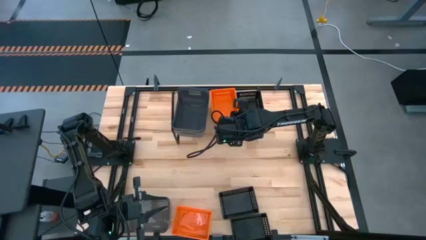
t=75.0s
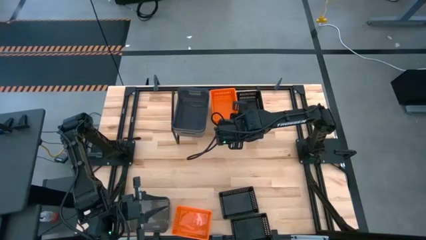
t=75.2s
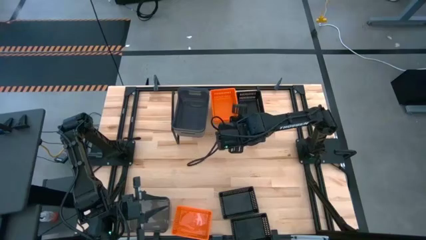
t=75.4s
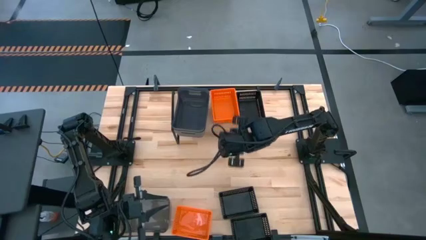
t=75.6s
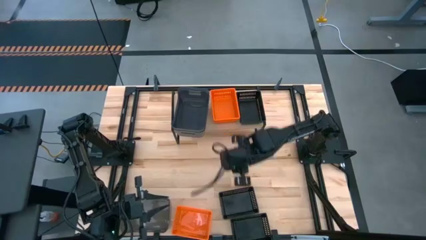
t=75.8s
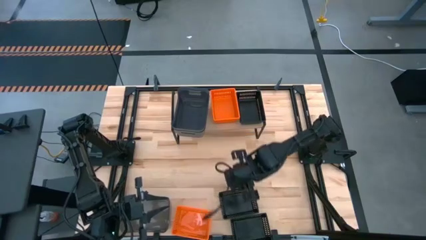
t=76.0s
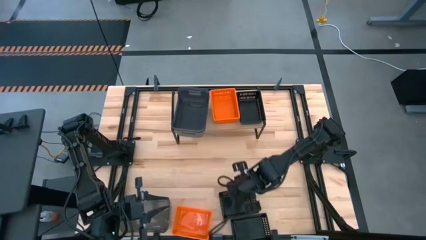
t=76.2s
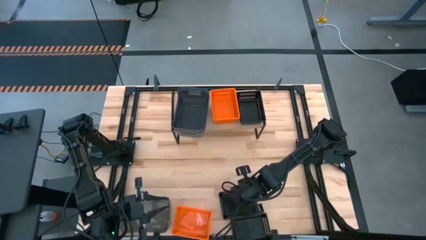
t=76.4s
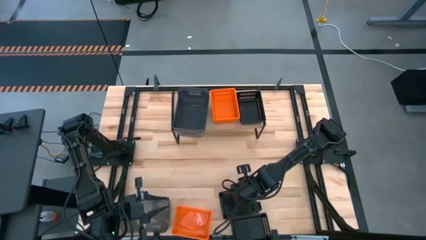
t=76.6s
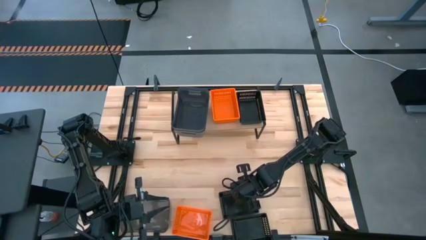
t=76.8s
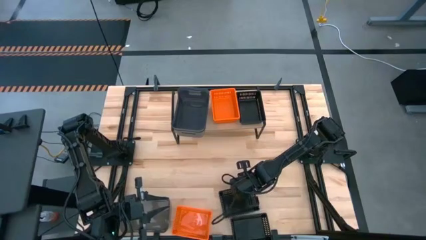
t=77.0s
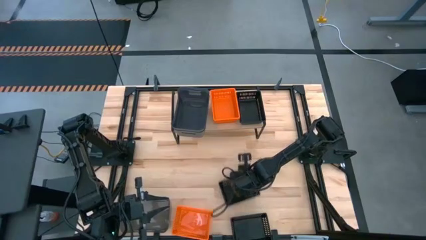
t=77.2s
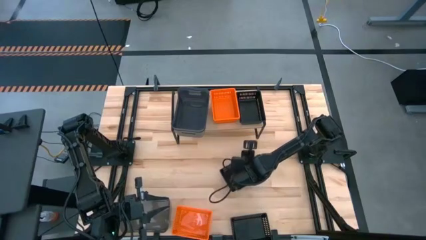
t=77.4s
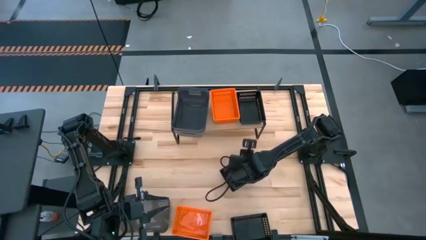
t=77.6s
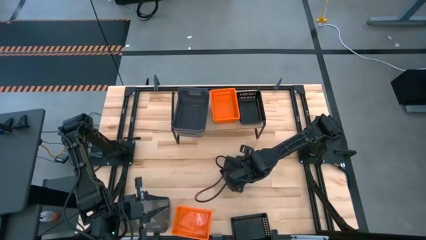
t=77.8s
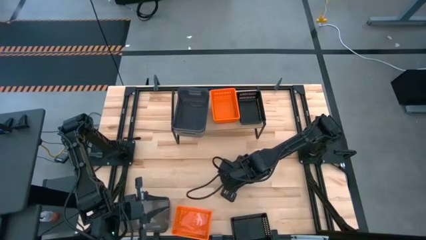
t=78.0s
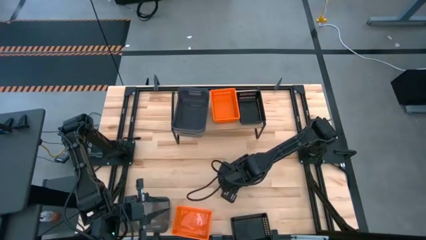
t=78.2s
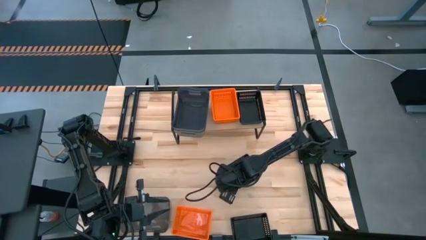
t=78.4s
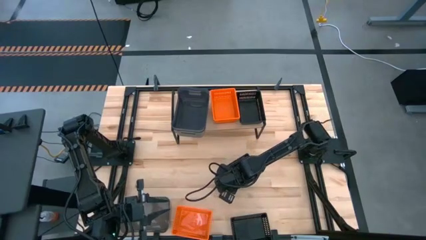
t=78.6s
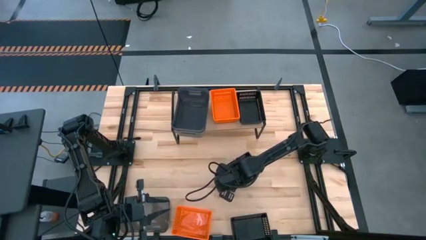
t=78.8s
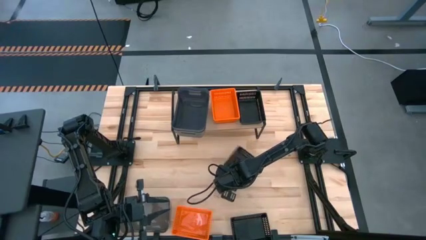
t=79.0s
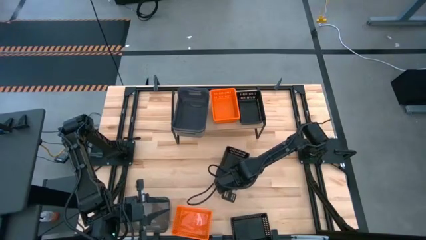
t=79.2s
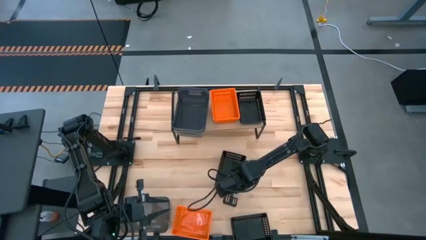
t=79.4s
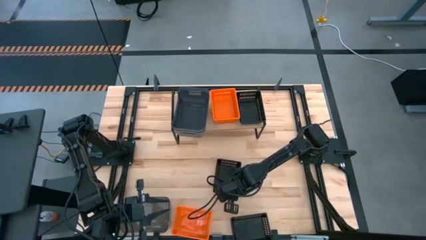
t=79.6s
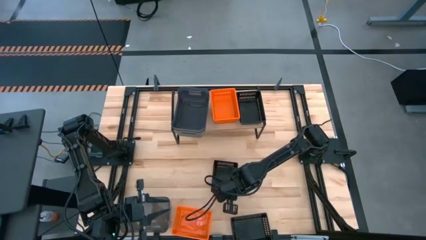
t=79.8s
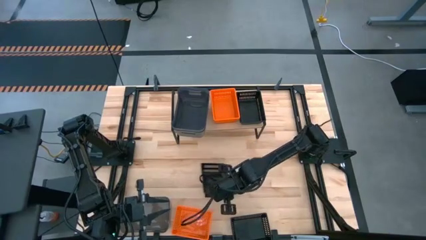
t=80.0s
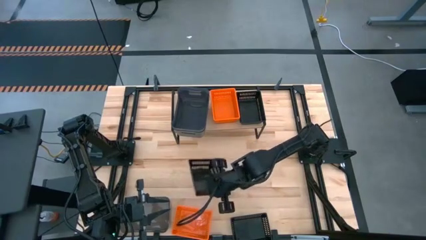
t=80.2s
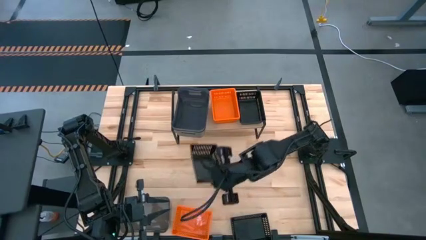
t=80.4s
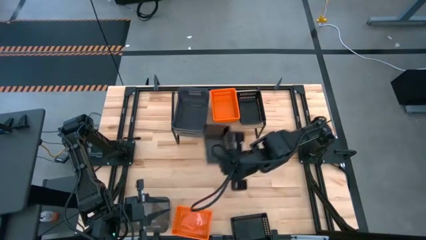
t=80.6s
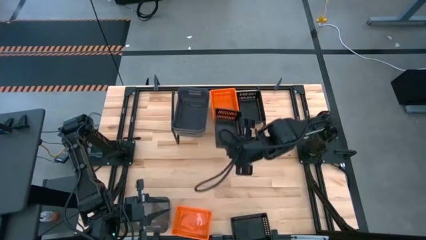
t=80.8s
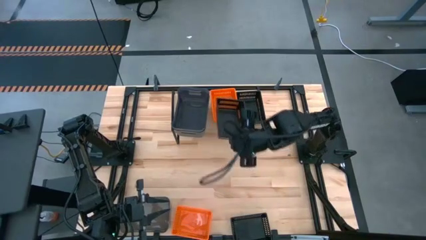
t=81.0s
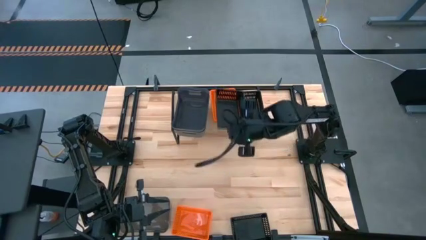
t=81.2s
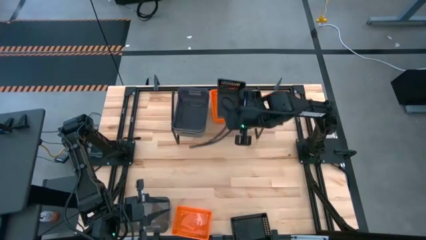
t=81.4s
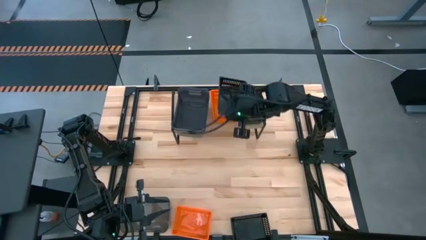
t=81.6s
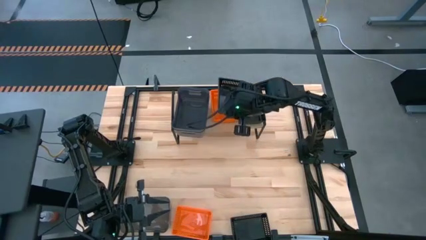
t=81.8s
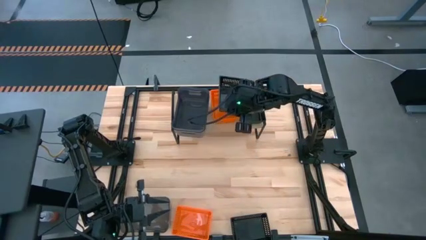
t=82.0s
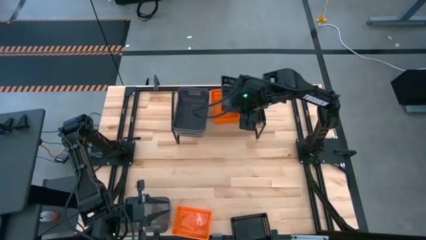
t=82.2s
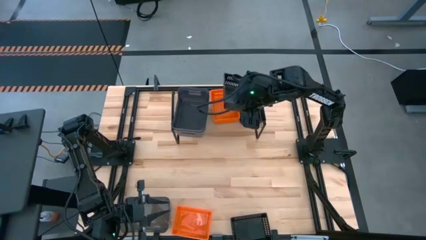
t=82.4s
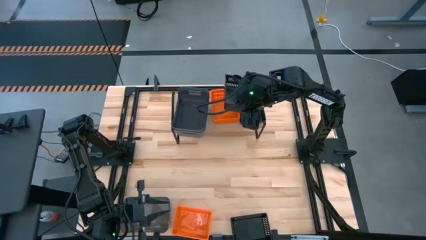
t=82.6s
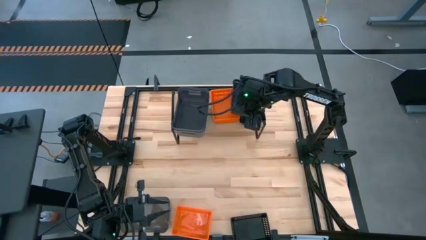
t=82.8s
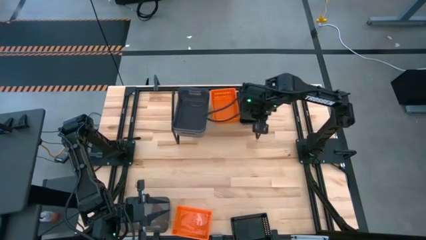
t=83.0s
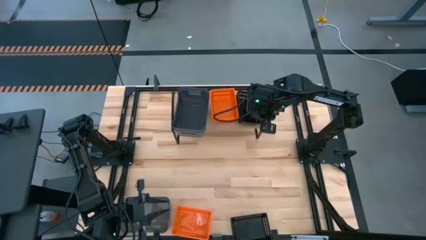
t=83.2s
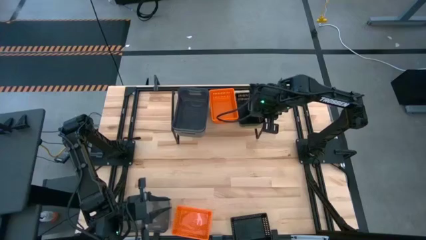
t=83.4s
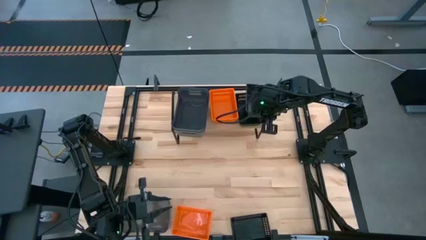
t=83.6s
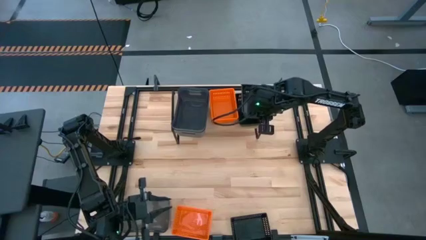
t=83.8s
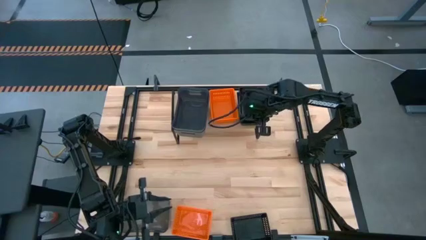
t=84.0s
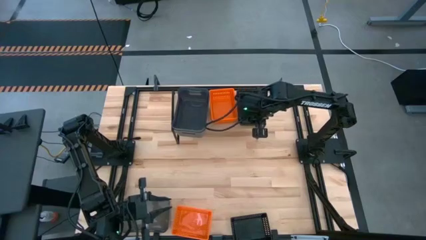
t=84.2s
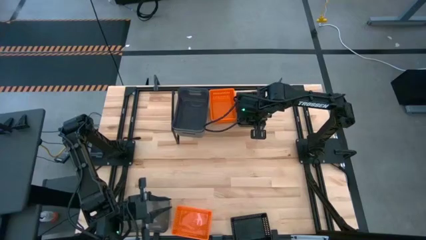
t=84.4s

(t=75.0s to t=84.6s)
Task: Stack baskets on shelf by color
Stack the top black bin on the black bin on the shelf

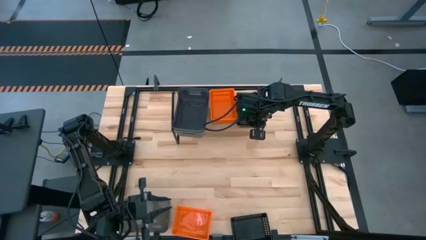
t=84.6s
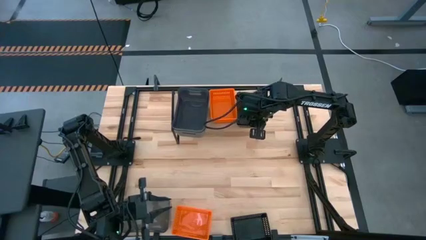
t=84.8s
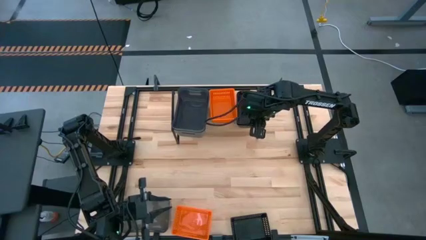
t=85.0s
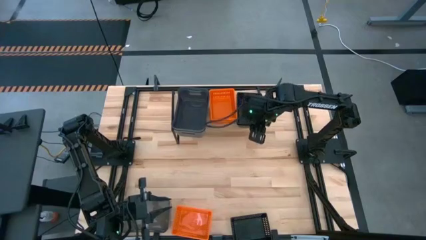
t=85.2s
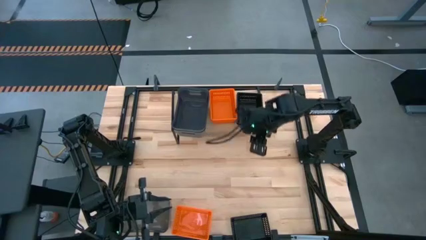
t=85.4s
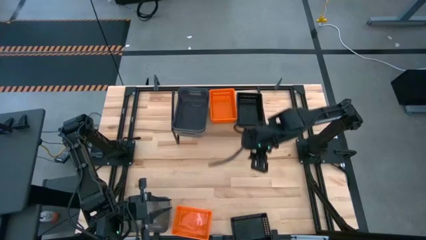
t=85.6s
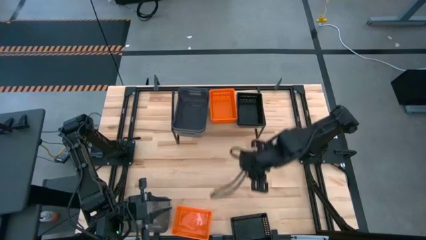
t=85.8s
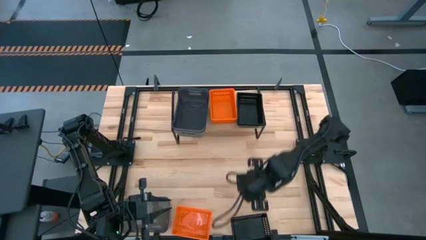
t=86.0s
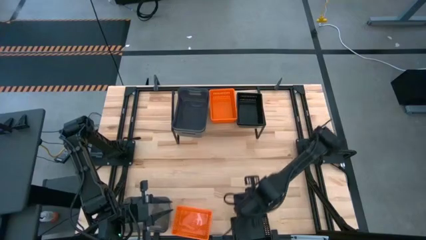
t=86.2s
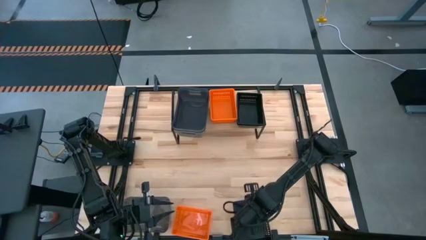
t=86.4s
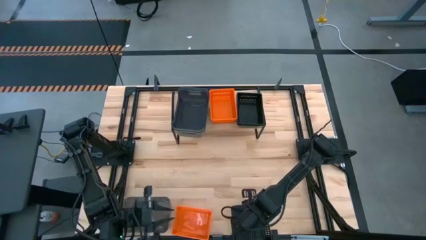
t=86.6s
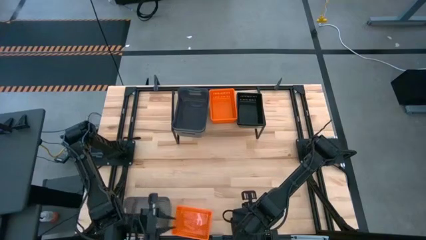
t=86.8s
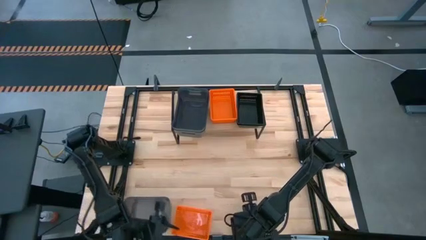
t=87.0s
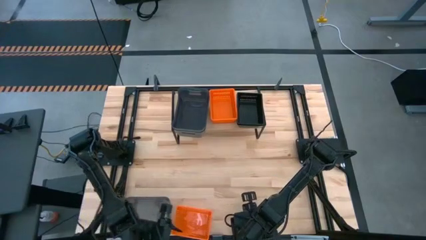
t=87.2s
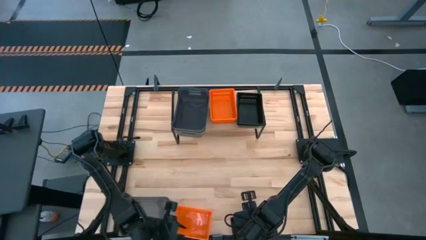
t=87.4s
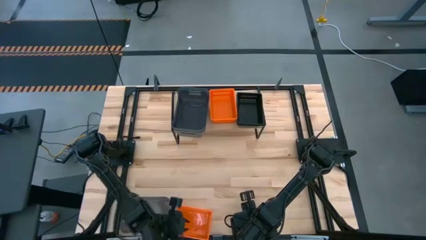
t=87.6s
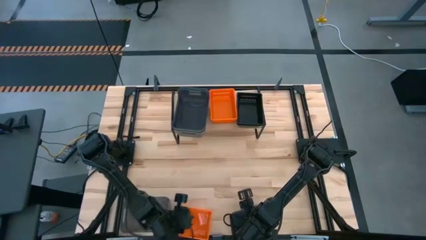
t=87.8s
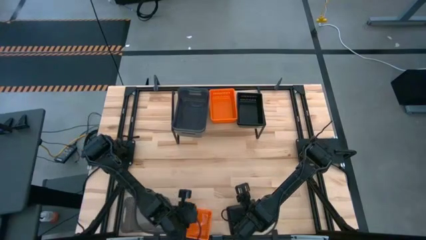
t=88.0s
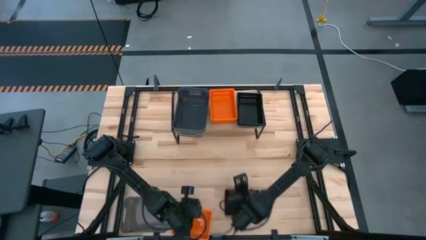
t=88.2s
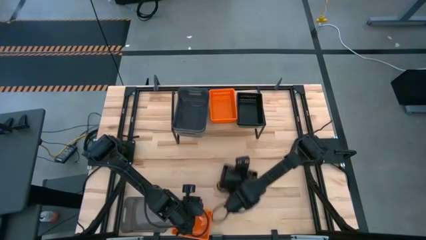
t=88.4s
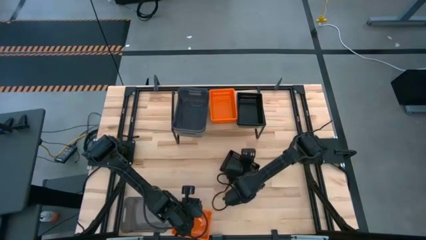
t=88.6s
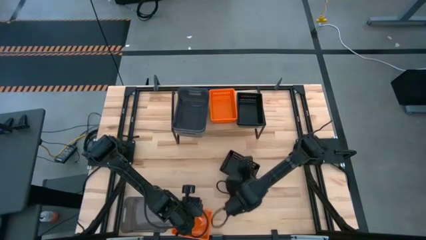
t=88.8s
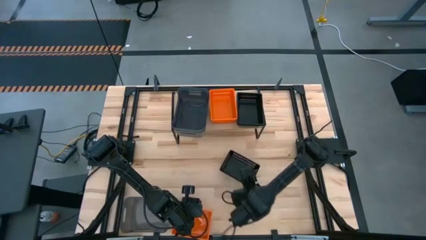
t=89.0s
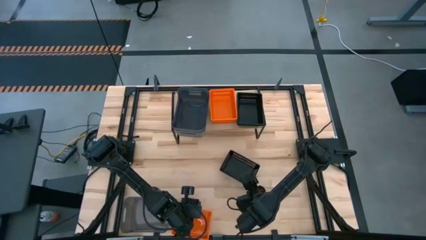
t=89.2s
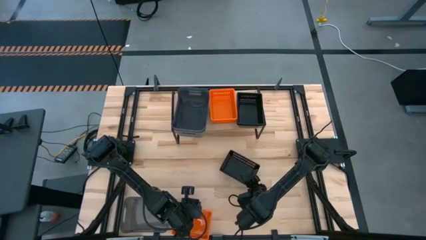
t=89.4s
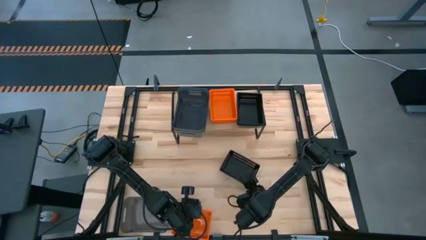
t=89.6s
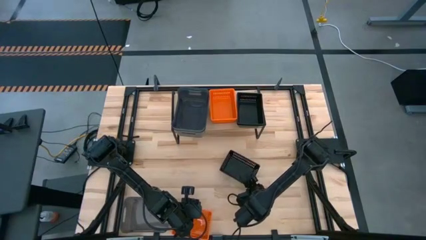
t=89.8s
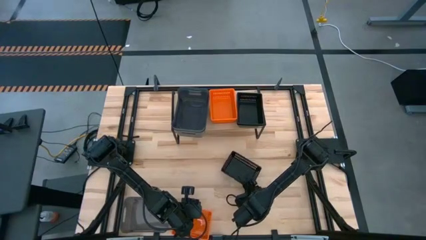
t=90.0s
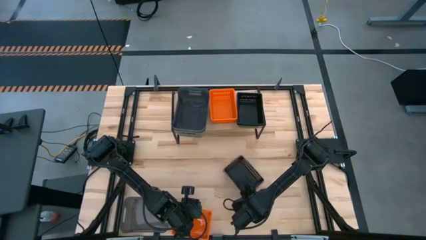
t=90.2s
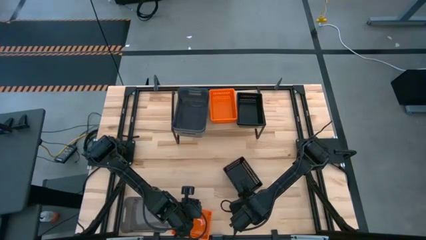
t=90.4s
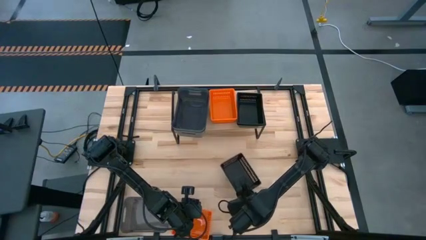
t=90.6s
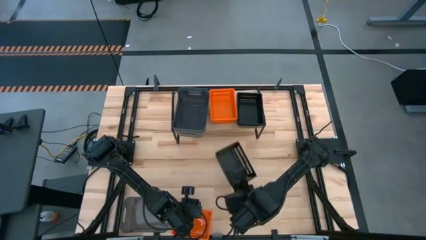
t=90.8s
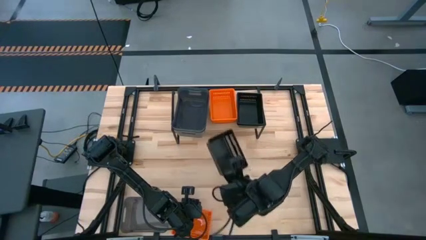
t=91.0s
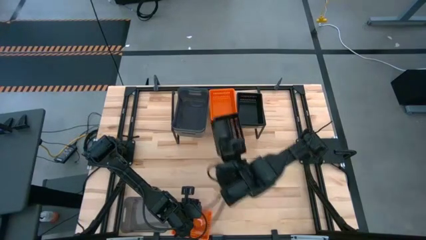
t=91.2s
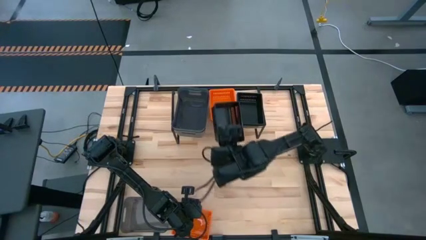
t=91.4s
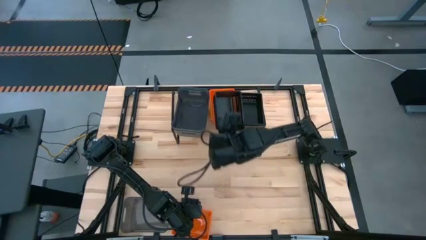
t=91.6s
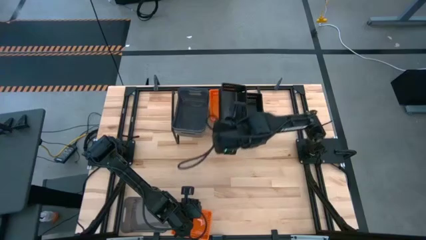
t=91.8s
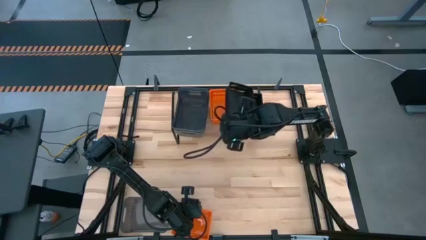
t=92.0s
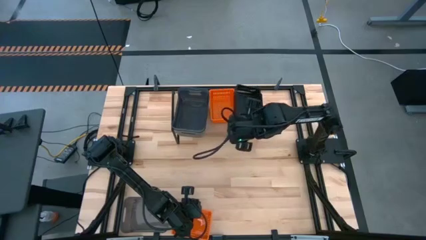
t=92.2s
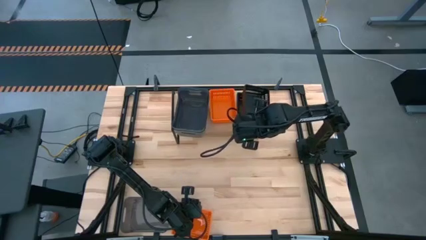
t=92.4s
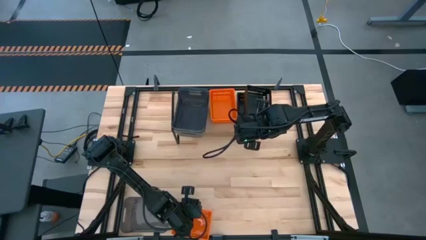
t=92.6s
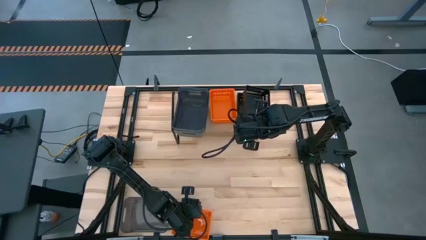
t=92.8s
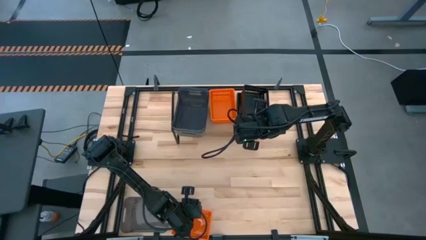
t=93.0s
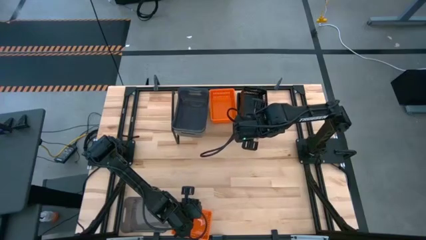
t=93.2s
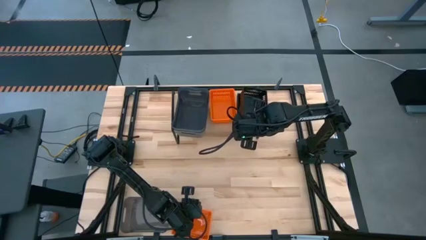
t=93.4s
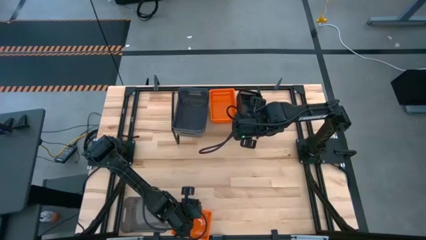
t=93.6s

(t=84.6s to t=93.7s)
Stack the black bin on the stacked black bins on the shelf
